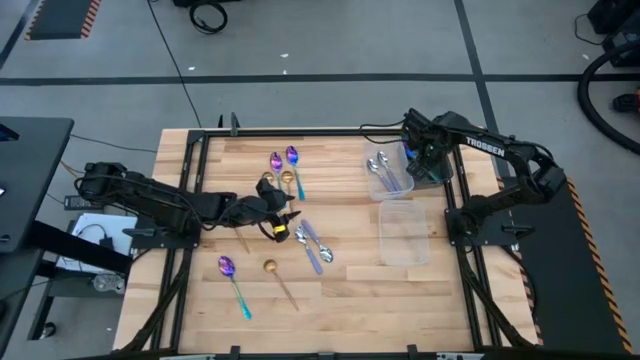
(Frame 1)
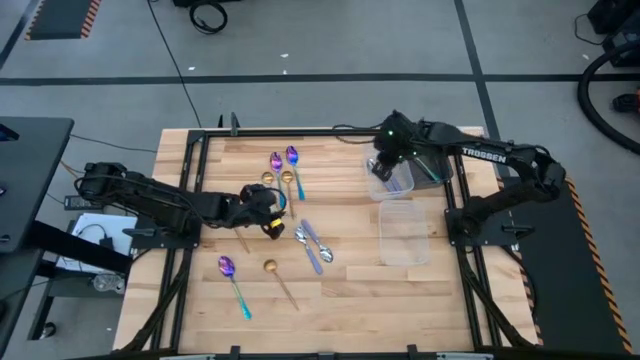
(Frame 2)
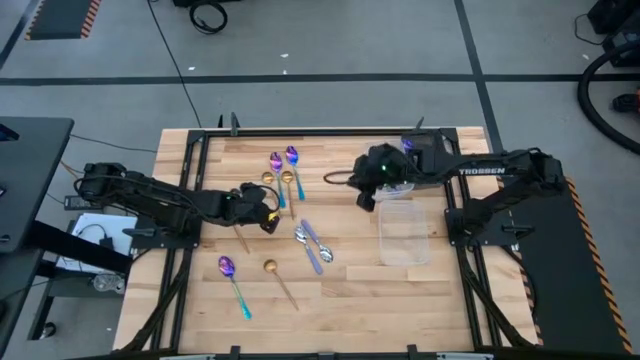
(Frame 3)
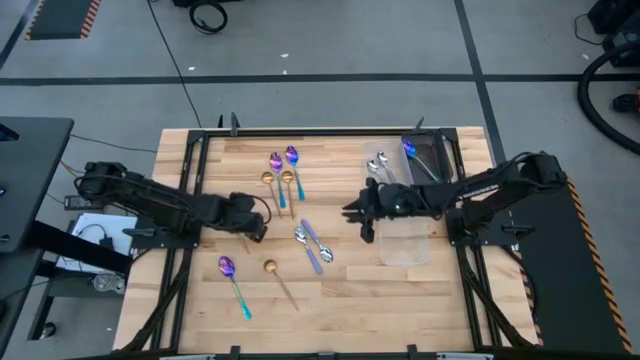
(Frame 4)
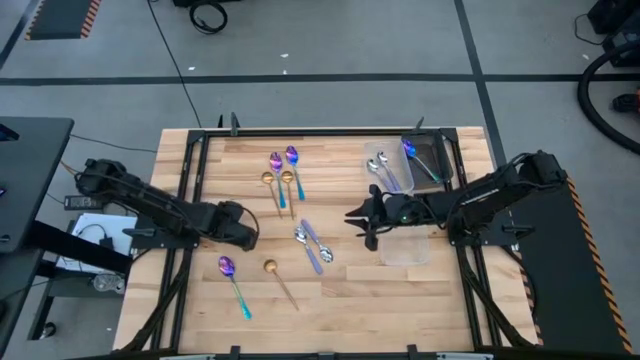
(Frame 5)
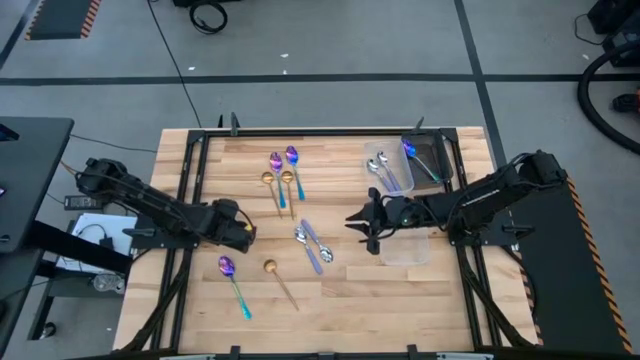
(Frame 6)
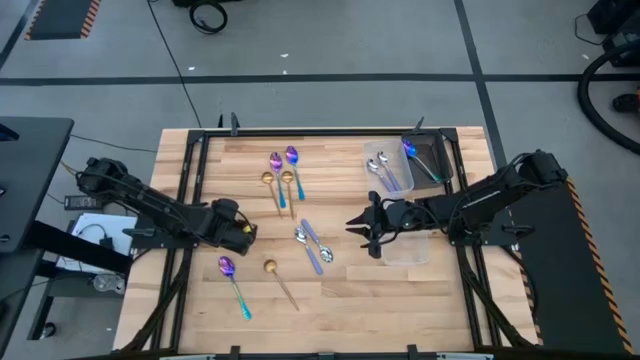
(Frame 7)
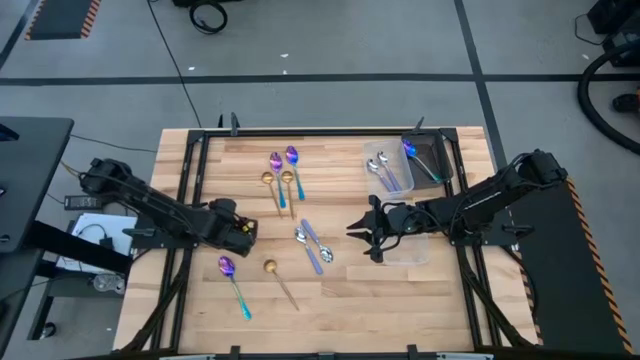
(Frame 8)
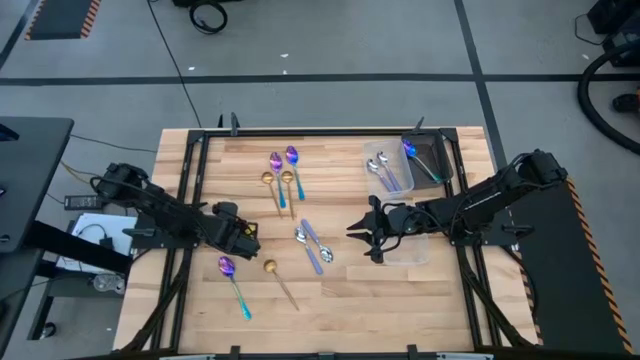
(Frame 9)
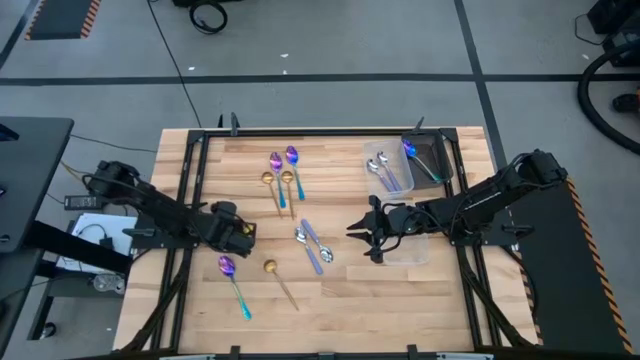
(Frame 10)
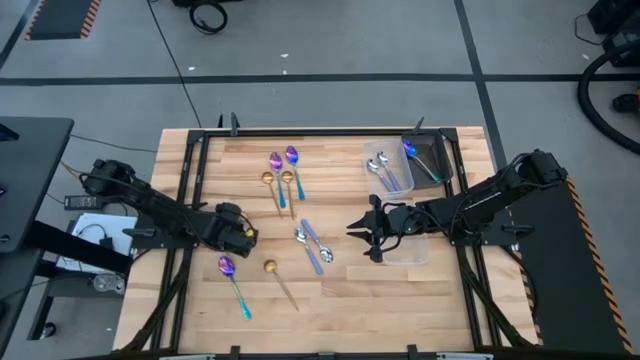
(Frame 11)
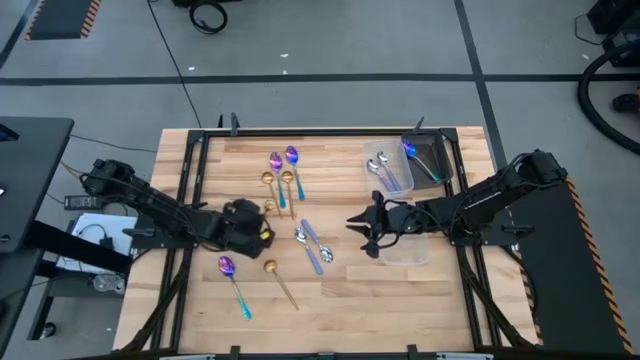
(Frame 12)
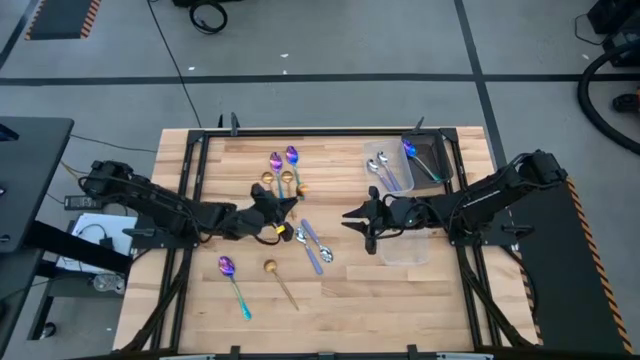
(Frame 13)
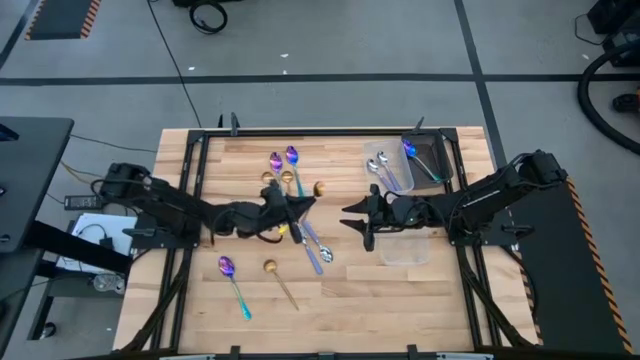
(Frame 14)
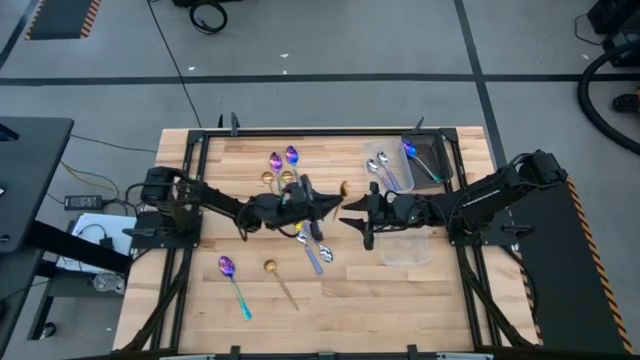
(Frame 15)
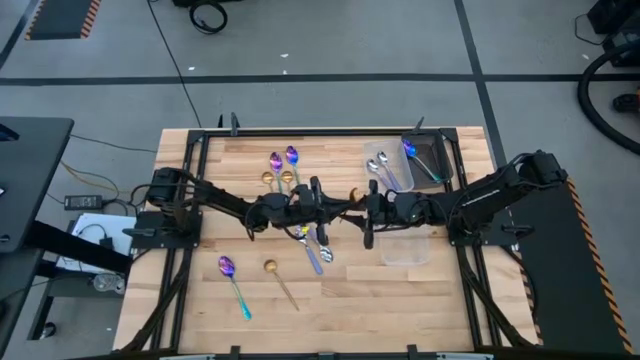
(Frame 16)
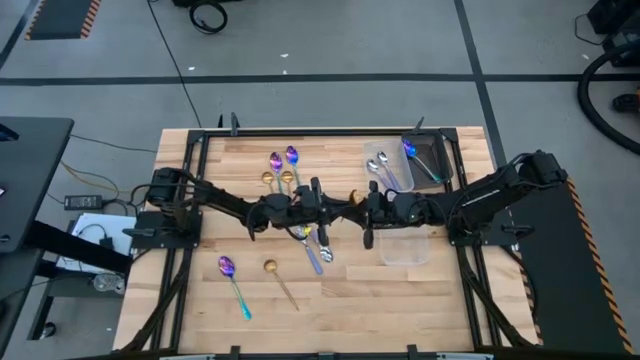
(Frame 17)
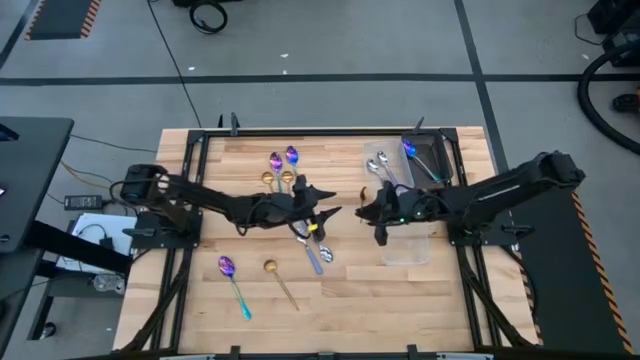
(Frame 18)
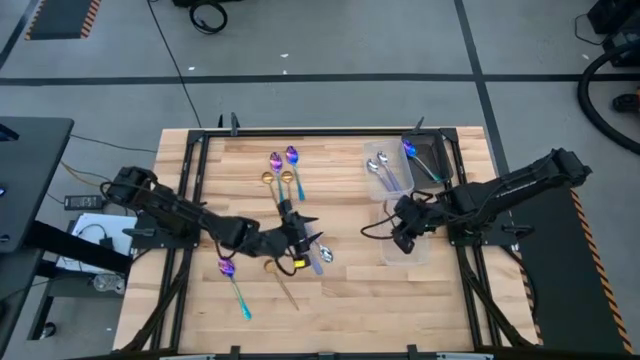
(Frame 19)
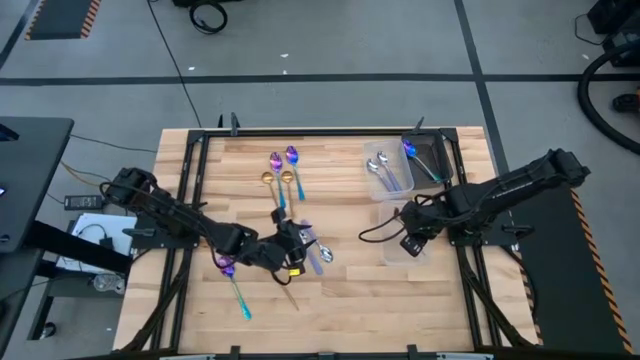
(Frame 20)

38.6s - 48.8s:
Task: Sort silverware by color (type)
Put the gold spoon into the bottom transparent bin

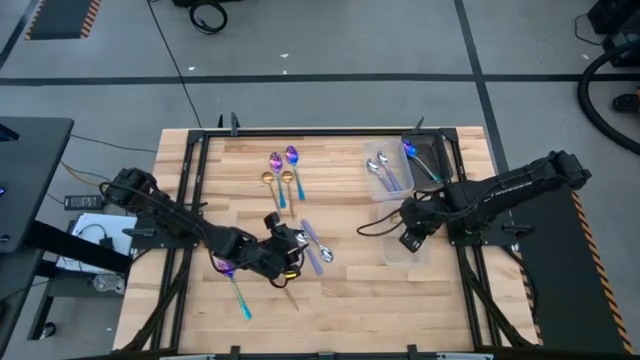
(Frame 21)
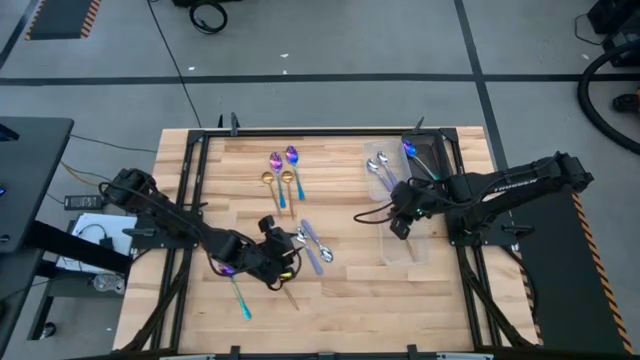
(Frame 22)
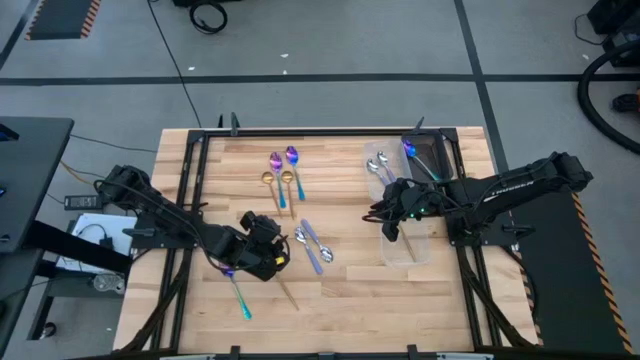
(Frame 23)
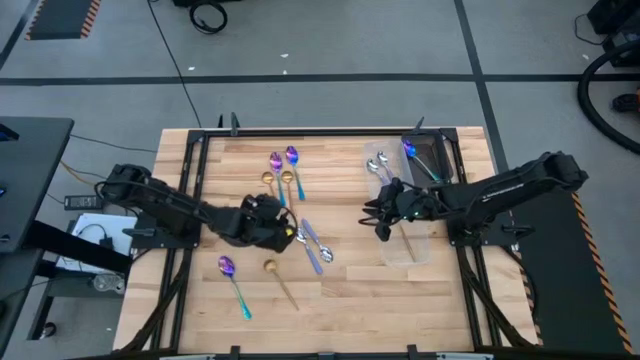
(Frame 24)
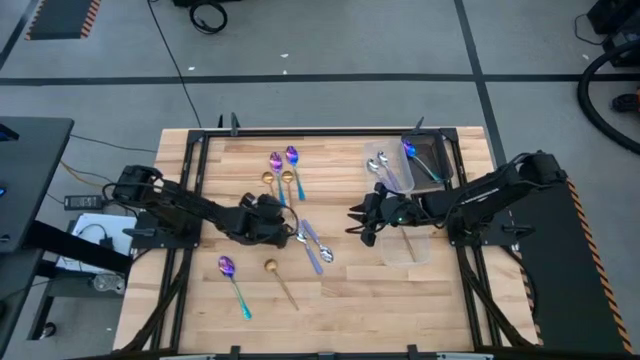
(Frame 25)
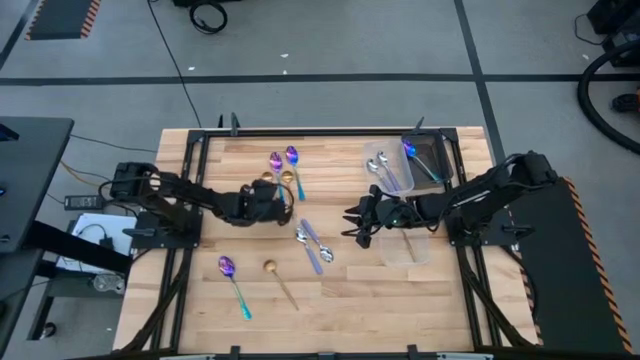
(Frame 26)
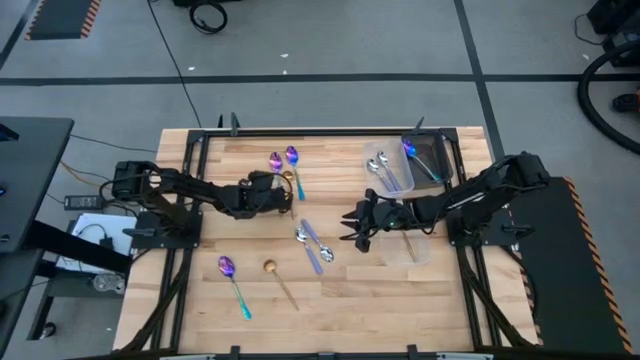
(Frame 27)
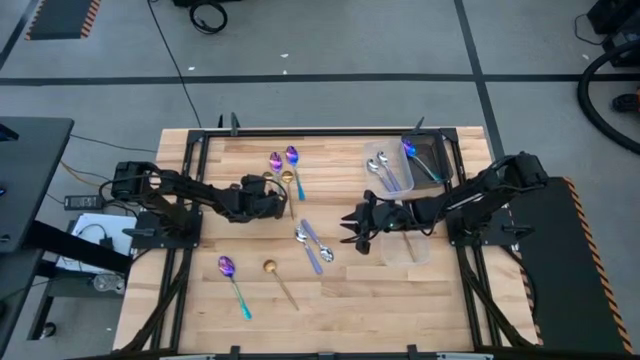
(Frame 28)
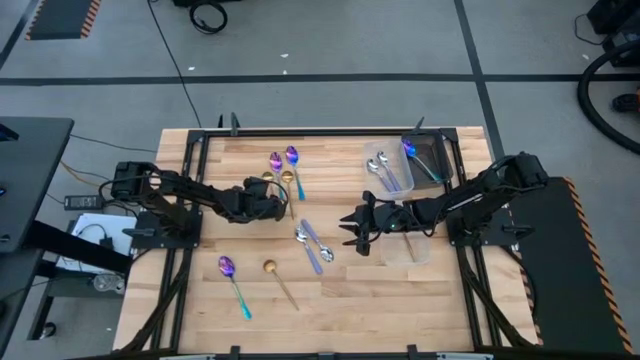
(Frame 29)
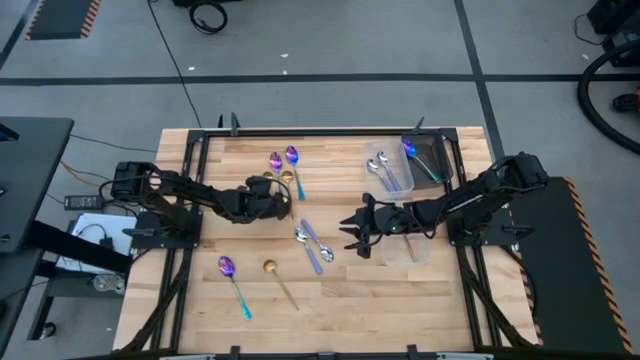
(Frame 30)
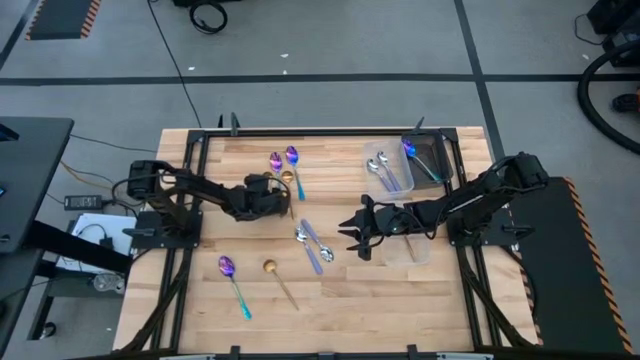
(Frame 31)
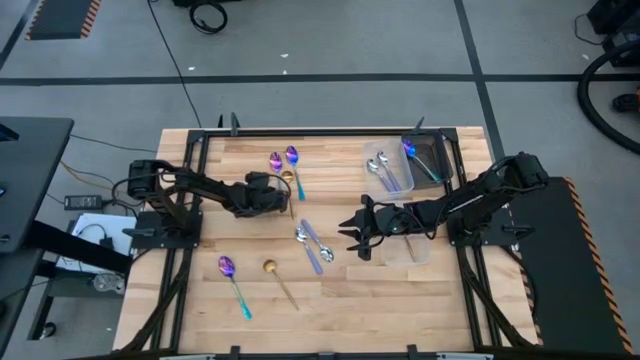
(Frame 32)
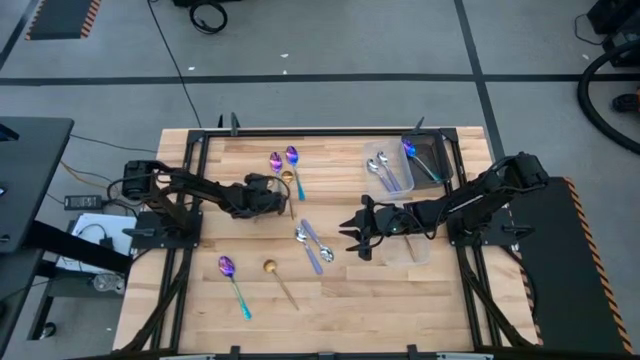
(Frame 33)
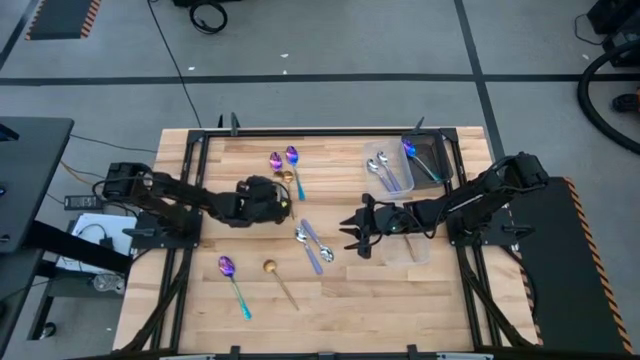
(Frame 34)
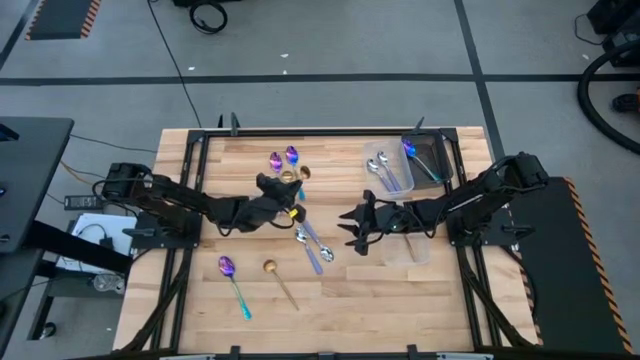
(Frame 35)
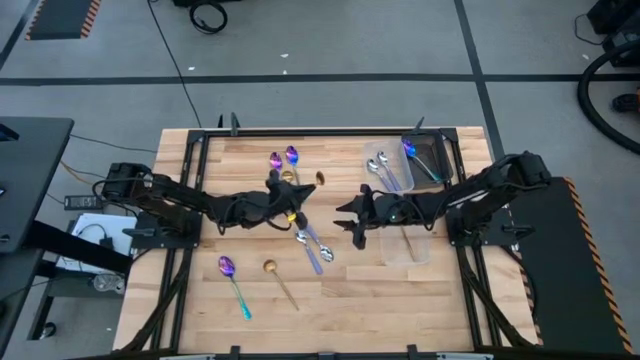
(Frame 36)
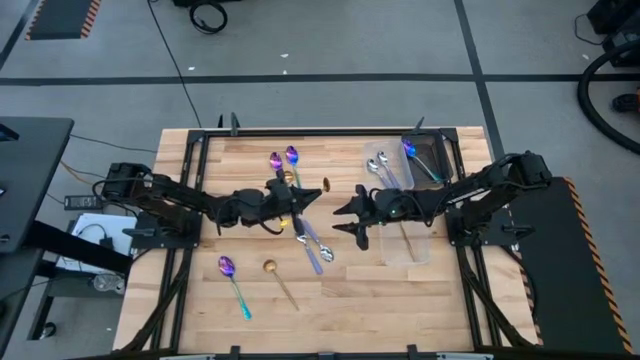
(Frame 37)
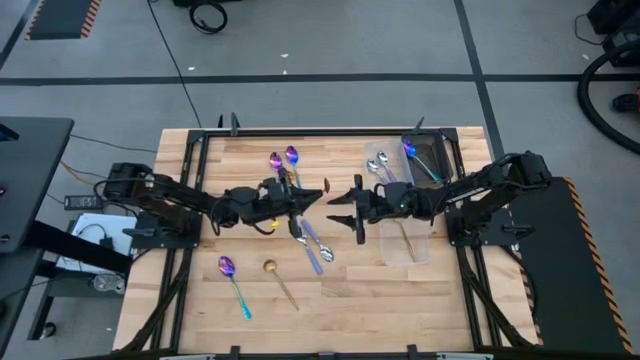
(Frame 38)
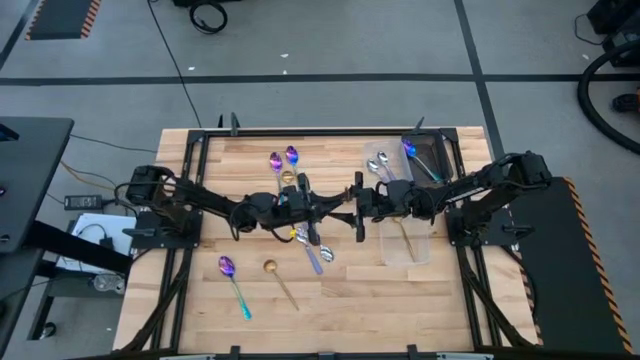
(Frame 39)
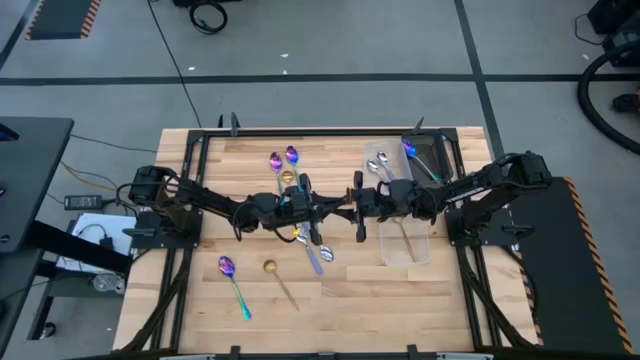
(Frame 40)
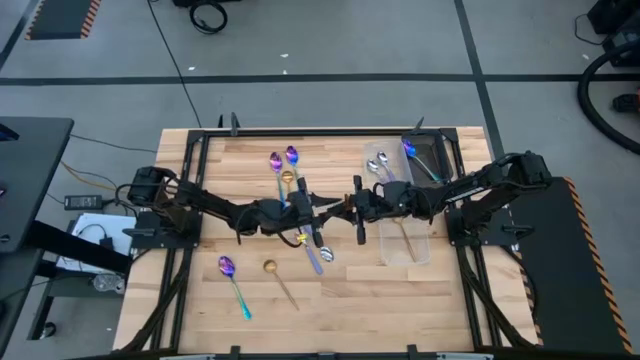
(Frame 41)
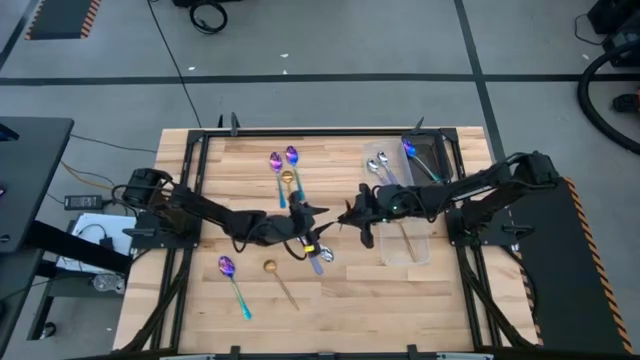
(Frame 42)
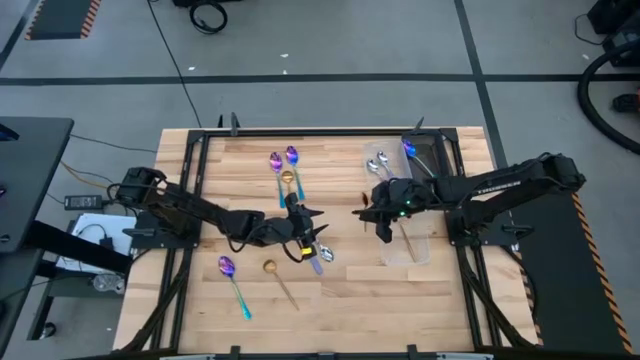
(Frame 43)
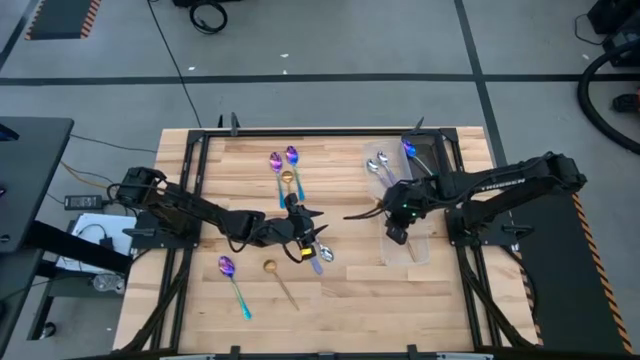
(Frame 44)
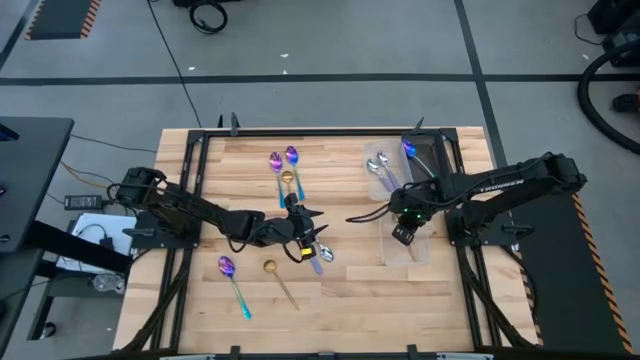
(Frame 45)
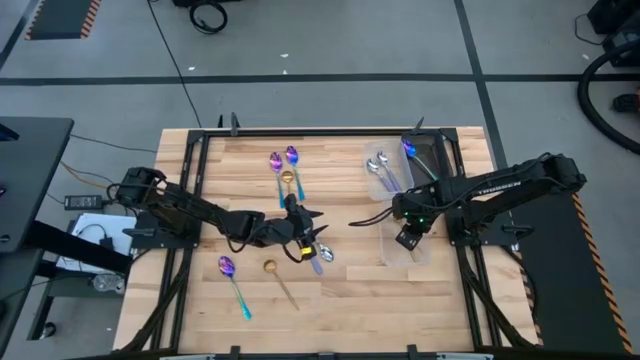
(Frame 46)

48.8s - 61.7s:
Put the gold spoon into the bottom transparent bin
